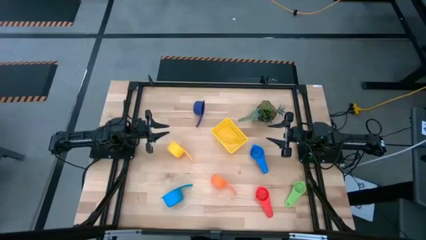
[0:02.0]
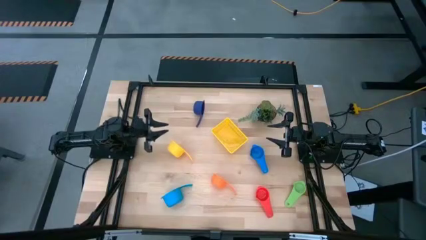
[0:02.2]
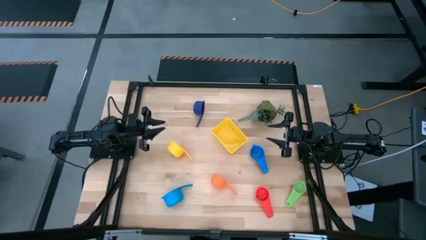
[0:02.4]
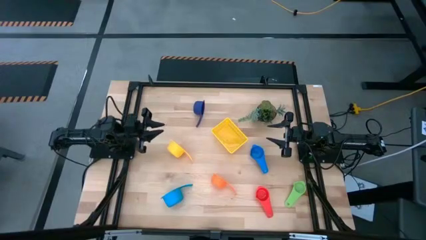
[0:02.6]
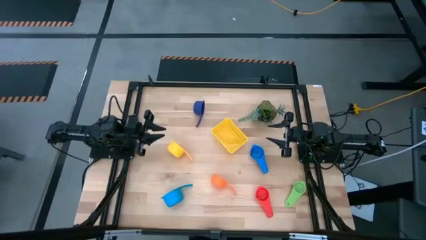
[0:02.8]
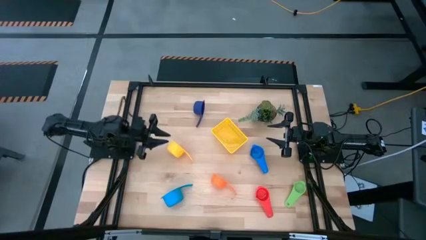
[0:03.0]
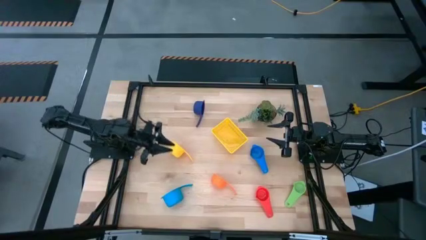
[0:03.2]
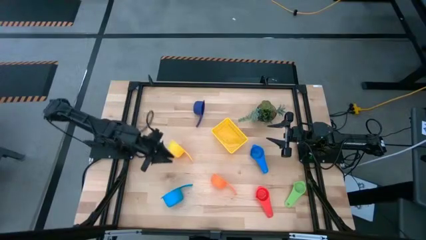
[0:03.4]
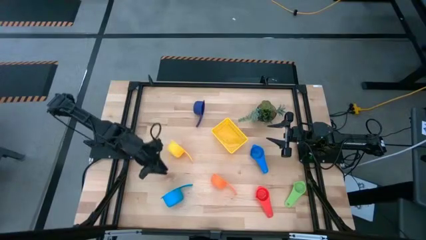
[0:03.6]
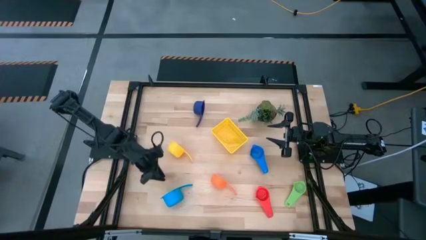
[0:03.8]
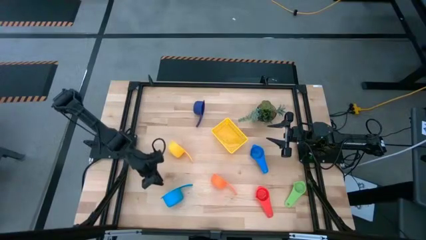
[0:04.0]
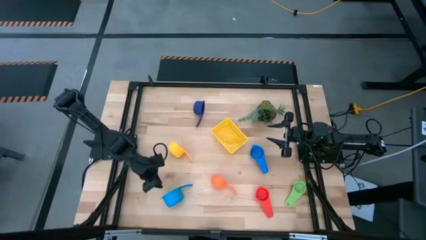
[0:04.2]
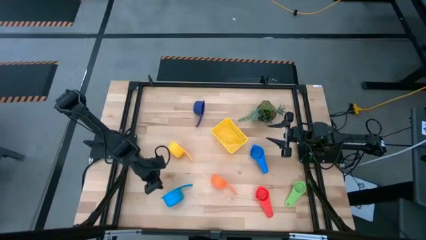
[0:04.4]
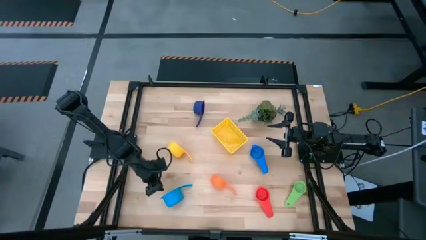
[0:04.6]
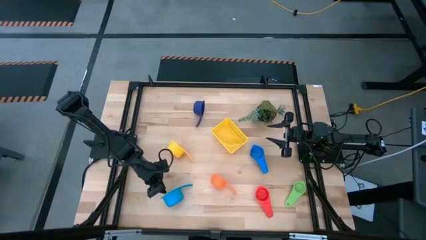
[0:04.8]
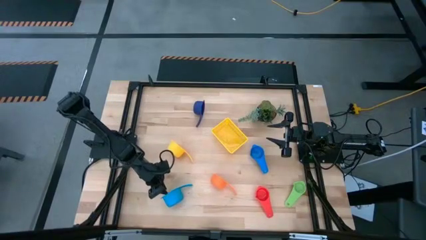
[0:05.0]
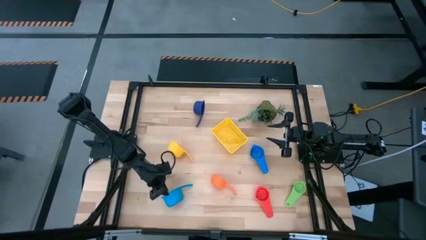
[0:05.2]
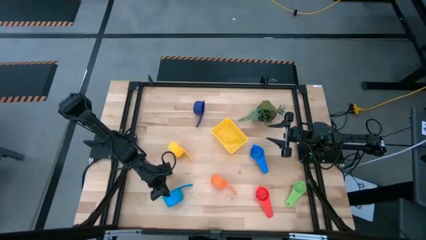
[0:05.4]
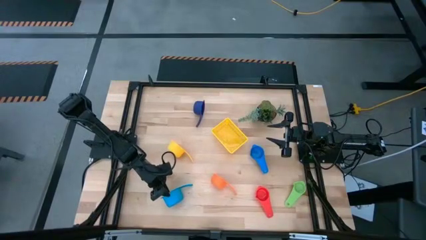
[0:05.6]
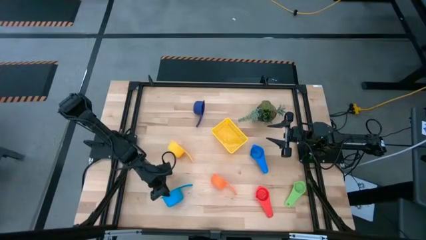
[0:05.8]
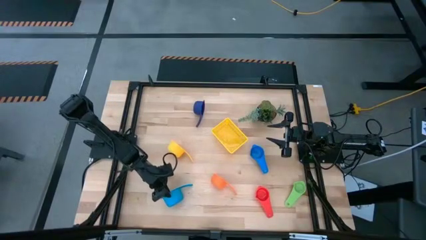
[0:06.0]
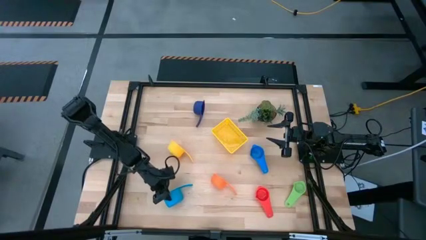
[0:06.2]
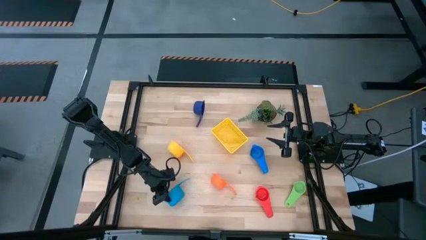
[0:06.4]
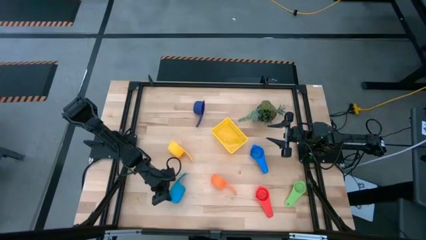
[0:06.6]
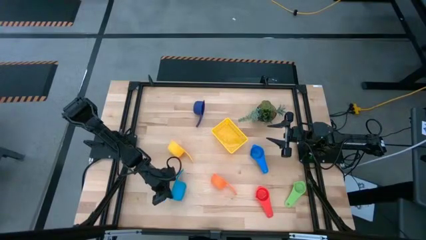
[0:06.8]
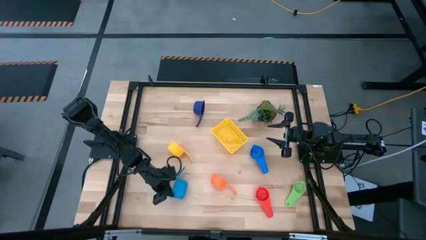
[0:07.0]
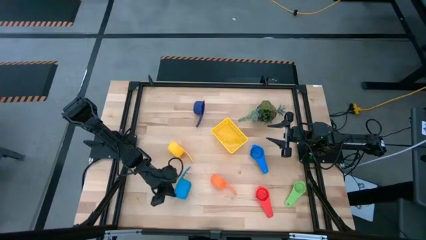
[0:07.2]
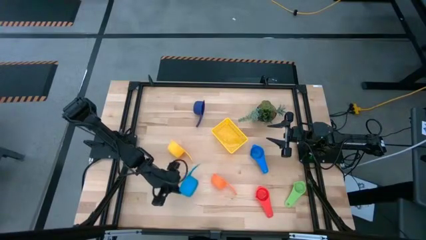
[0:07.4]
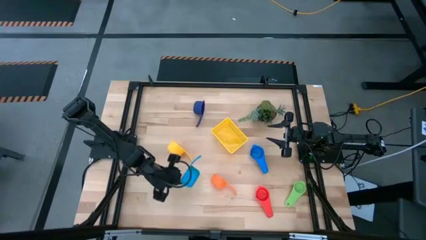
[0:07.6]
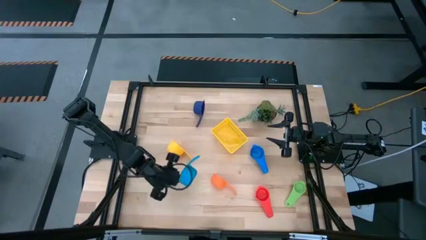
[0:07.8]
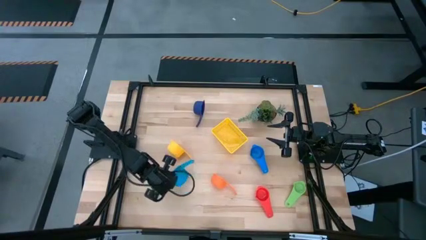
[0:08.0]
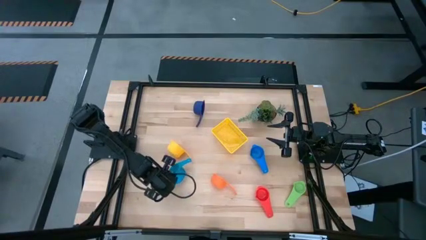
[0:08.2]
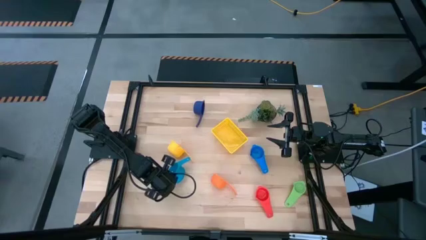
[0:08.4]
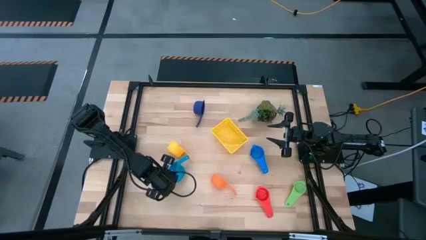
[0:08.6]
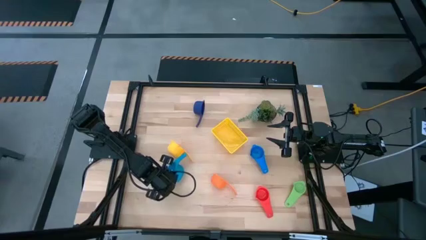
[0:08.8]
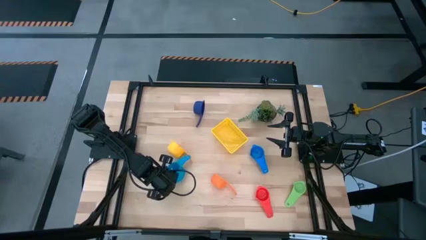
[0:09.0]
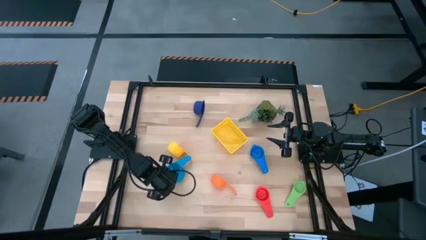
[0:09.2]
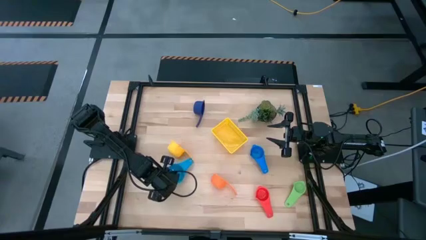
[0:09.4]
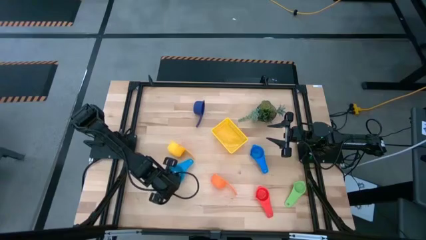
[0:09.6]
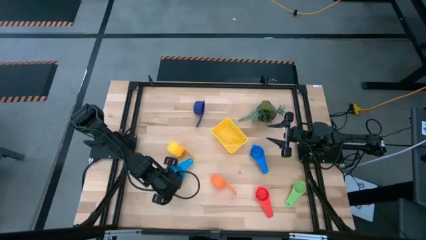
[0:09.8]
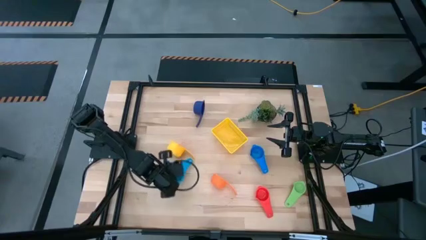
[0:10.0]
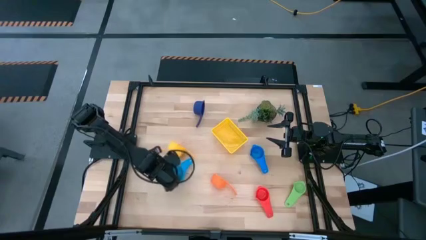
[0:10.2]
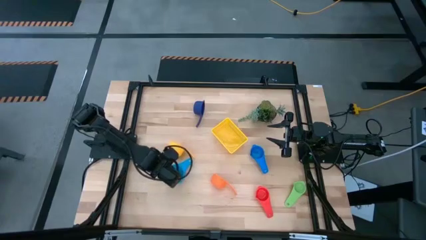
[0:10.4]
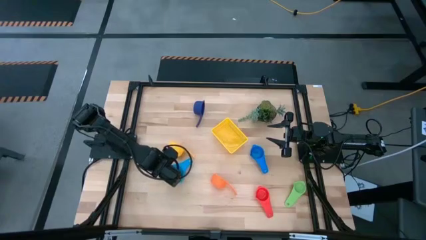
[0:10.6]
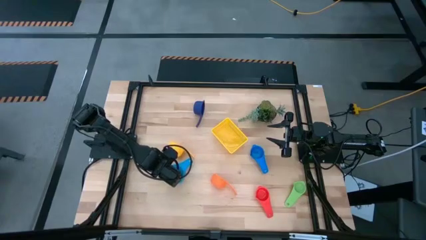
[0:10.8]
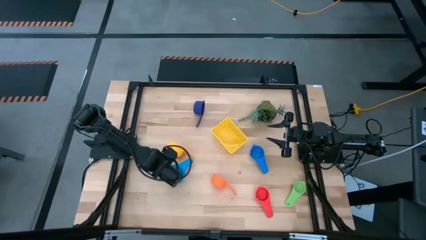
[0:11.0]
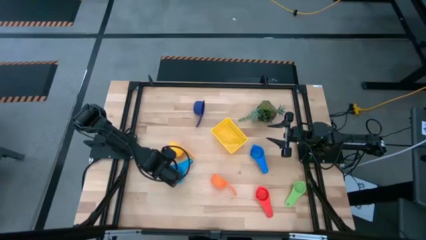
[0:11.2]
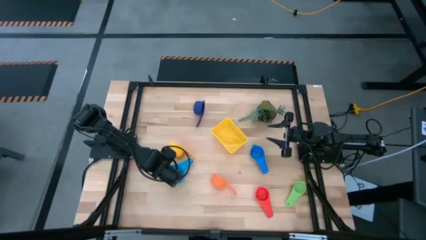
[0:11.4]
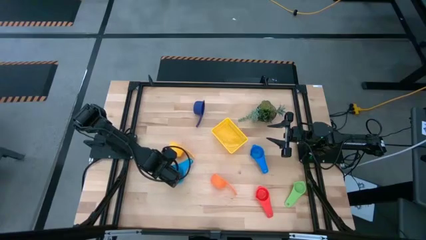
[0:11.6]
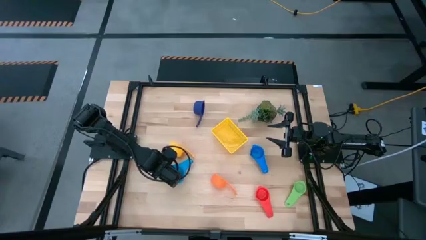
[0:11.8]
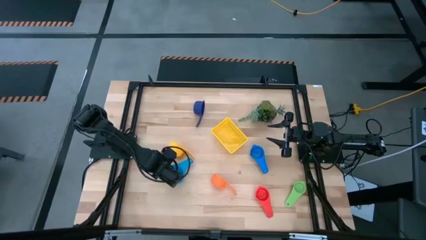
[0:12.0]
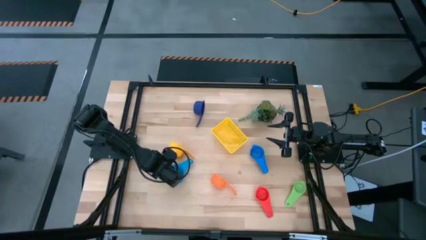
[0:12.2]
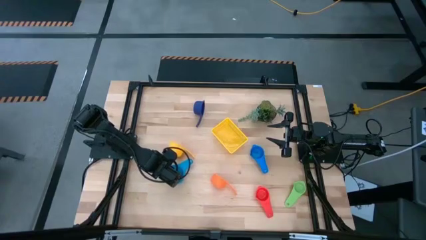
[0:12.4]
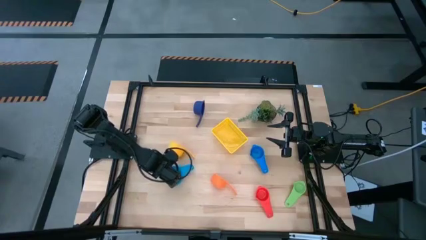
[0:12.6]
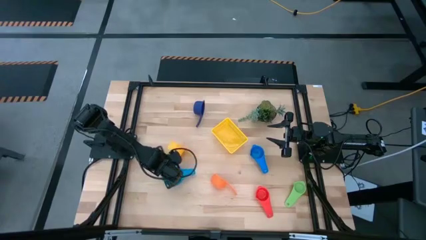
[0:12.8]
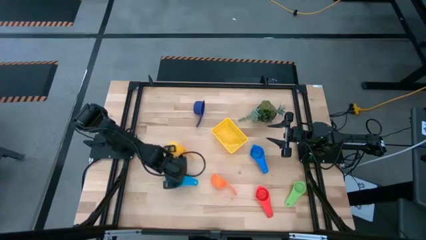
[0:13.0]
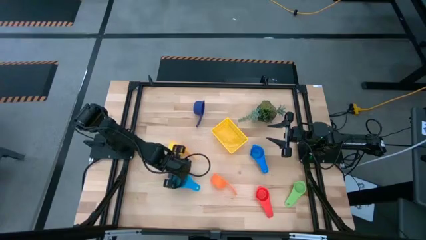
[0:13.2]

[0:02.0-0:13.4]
Task: Nest measuring cups in basket
Prepare the light blue measuring cup
